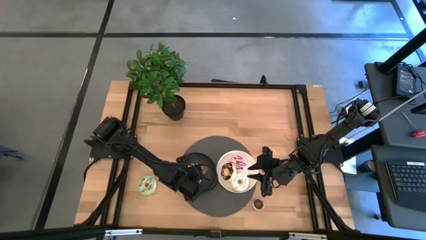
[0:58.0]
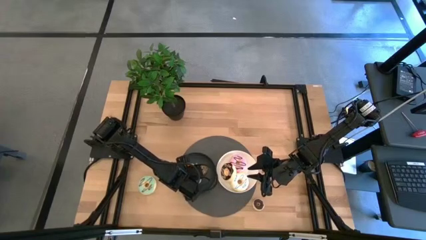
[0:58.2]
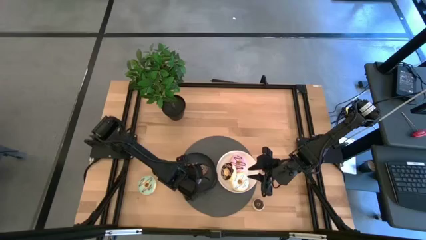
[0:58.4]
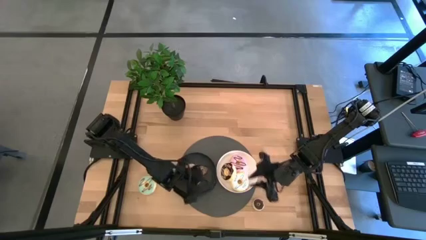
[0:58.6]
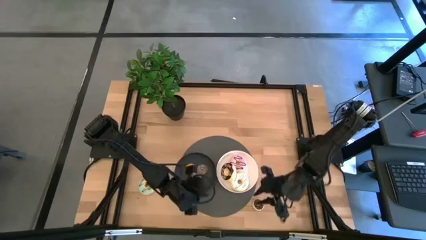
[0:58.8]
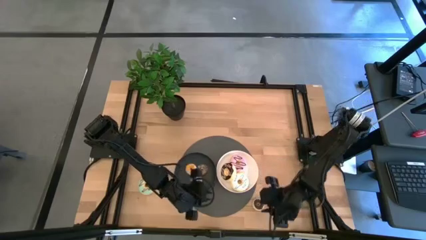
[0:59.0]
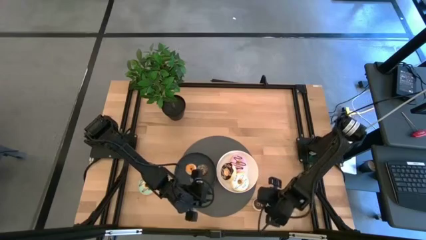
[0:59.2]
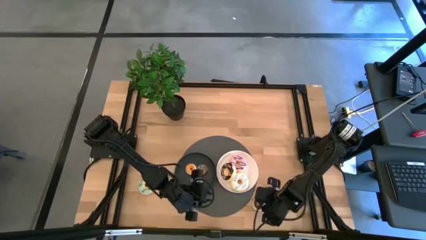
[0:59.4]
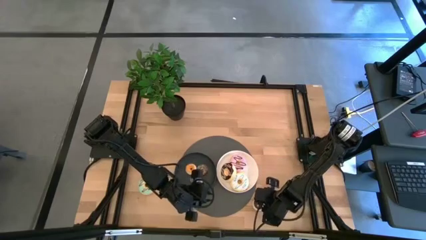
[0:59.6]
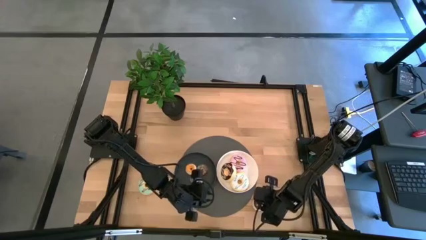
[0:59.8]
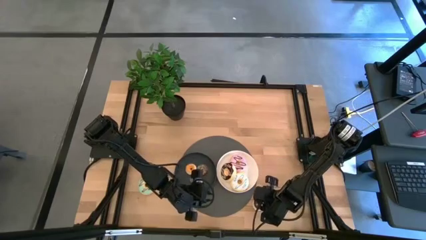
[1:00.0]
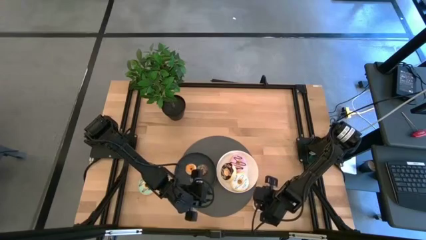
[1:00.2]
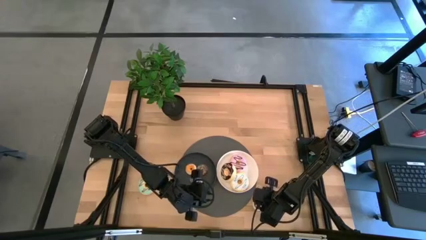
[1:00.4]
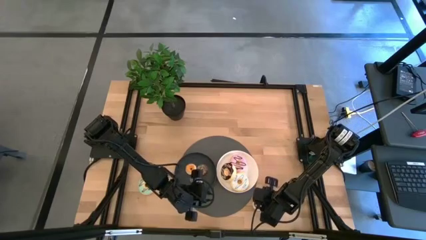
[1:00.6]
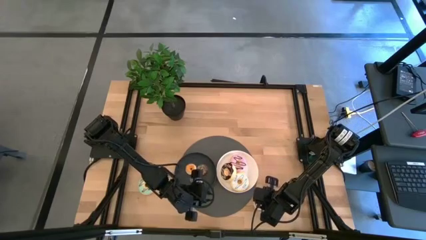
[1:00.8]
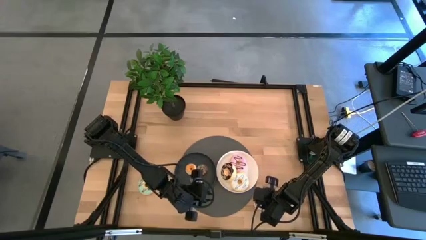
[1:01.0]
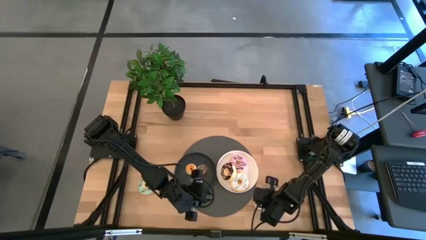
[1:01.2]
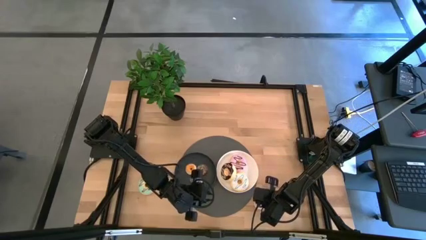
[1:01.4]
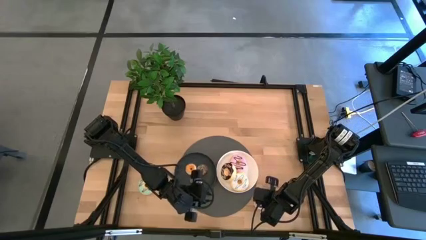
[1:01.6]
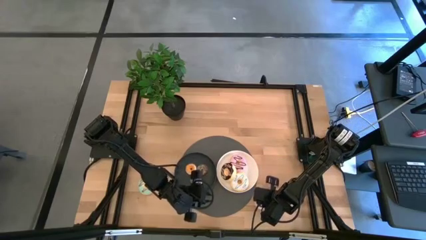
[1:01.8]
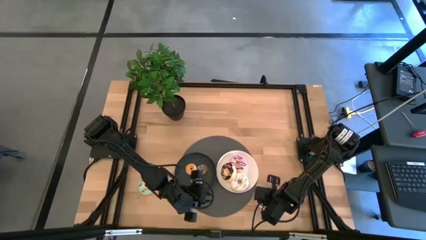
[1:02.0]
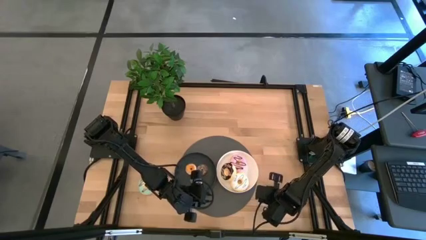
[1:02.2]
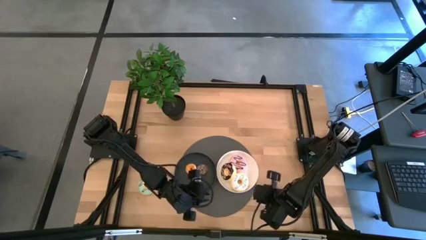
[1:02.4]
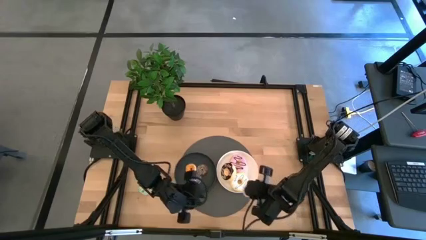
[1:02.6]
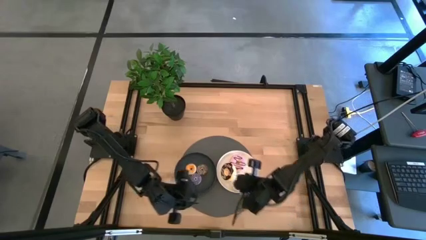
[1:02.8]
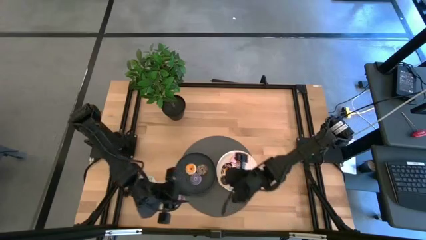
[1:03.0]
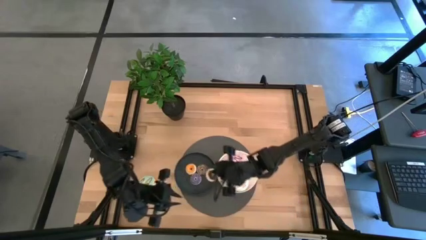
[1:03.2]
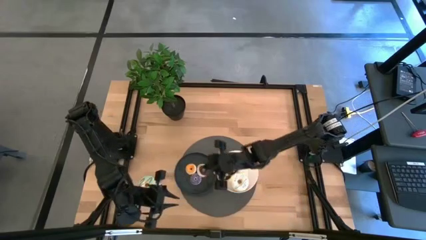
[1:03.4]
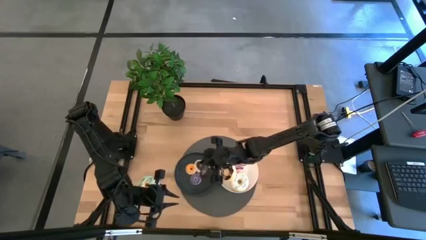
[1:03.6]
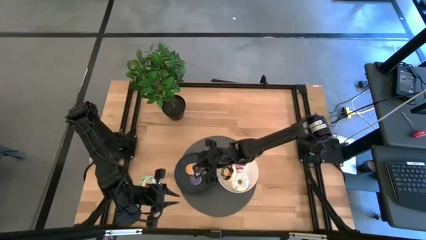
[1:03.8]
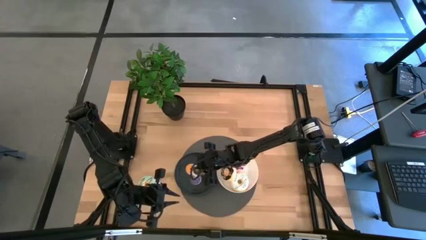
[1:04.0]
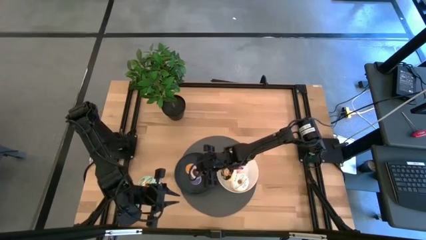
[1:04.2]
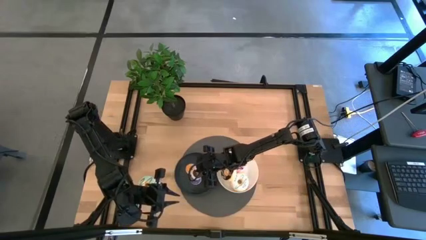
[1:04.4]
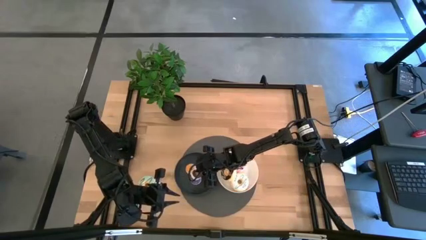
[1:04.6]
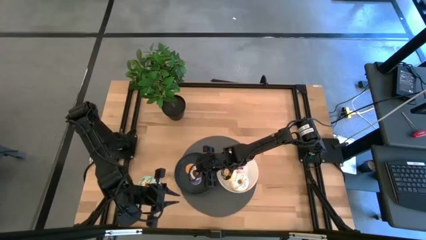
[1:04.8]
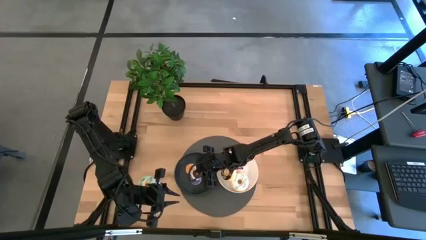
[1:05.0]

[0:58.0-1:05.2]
Task: Pick & Place donuts
Put the small black donut onto the black plate

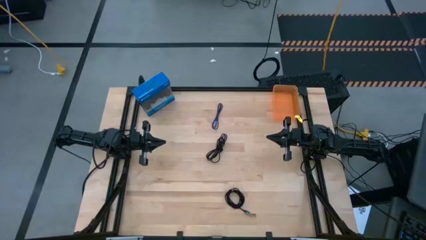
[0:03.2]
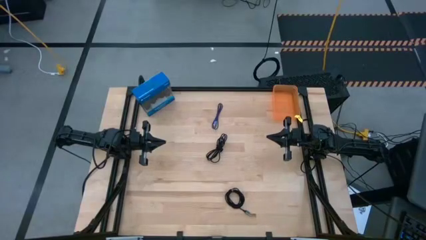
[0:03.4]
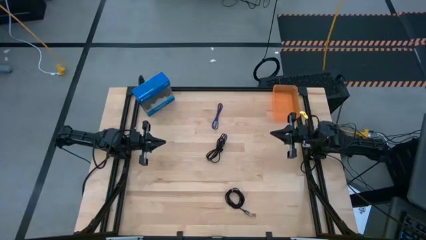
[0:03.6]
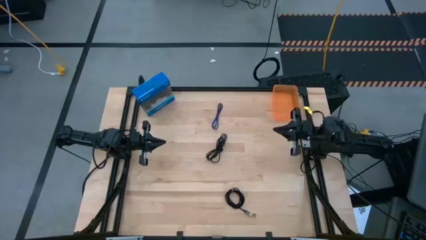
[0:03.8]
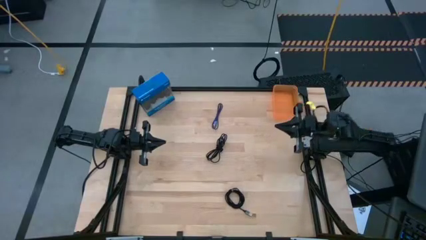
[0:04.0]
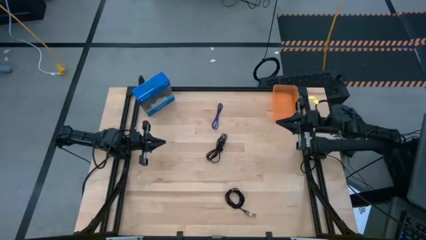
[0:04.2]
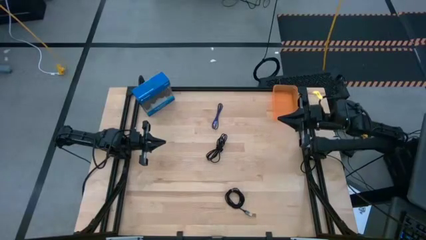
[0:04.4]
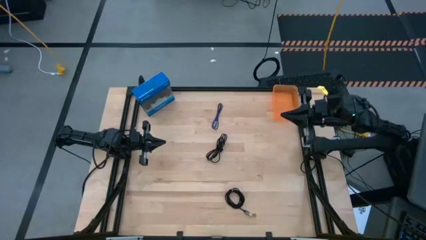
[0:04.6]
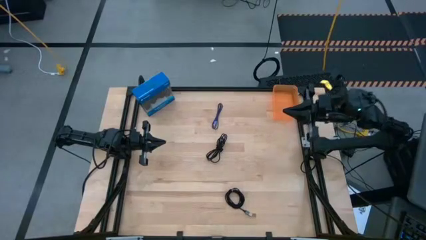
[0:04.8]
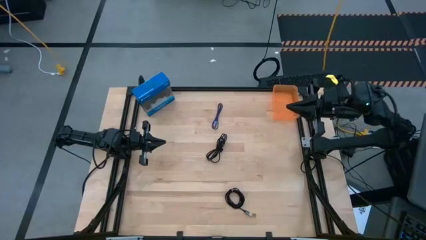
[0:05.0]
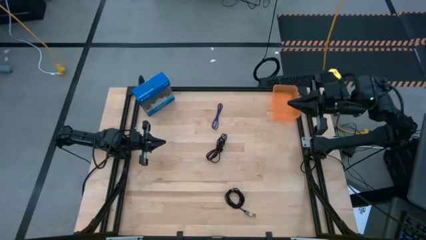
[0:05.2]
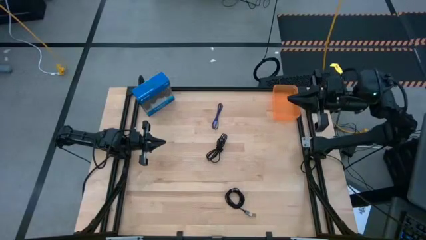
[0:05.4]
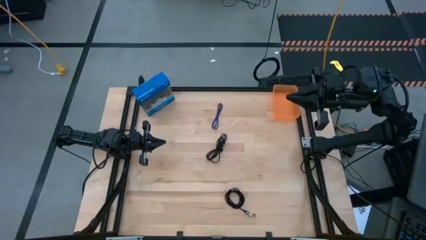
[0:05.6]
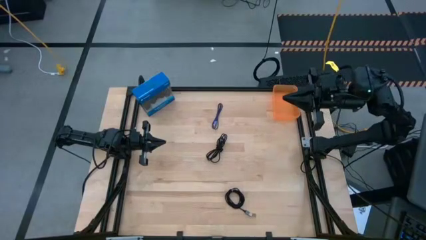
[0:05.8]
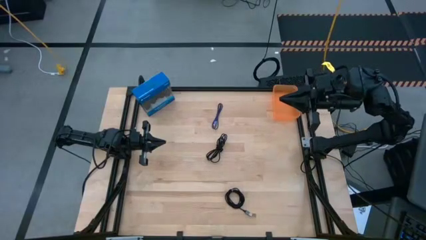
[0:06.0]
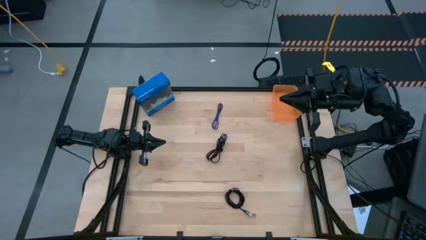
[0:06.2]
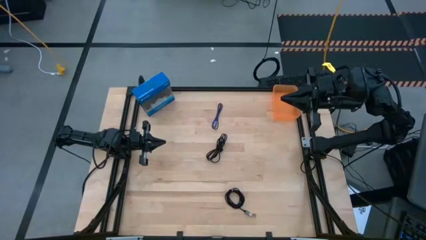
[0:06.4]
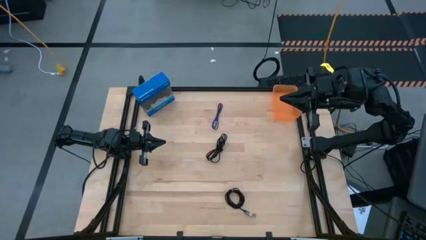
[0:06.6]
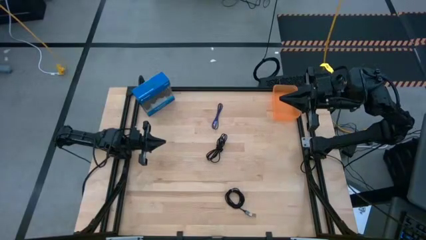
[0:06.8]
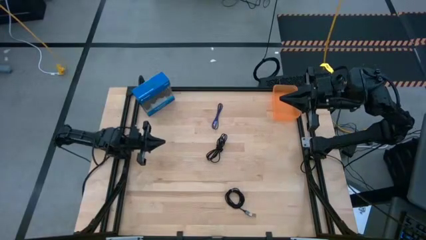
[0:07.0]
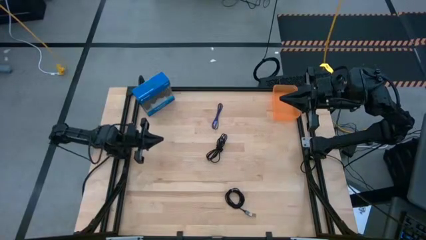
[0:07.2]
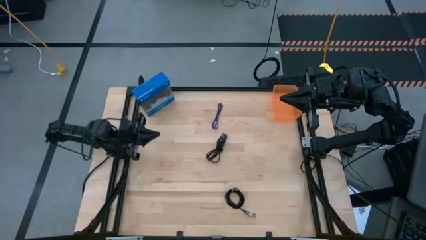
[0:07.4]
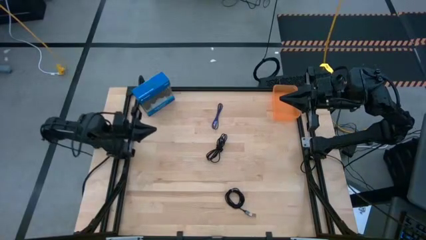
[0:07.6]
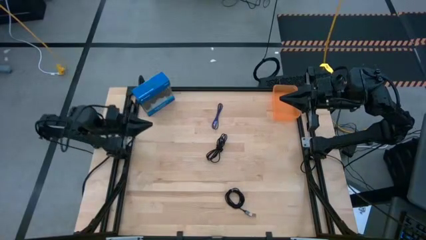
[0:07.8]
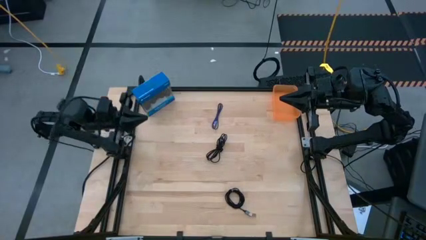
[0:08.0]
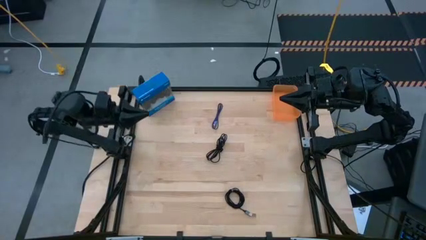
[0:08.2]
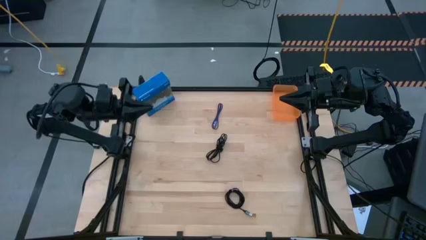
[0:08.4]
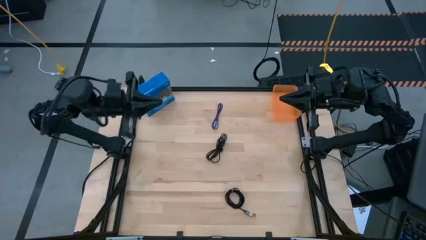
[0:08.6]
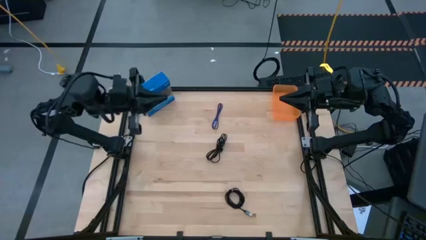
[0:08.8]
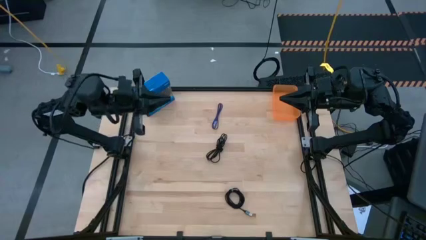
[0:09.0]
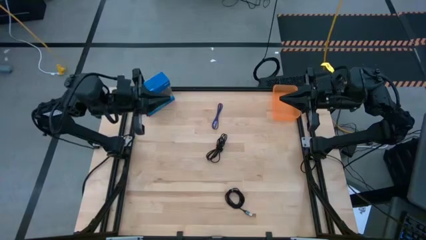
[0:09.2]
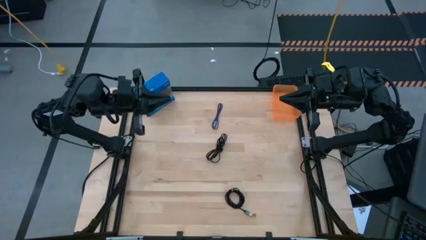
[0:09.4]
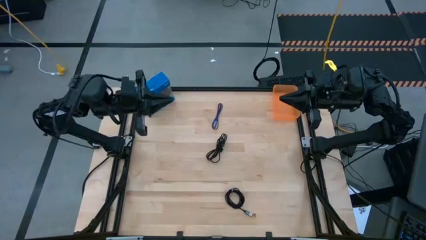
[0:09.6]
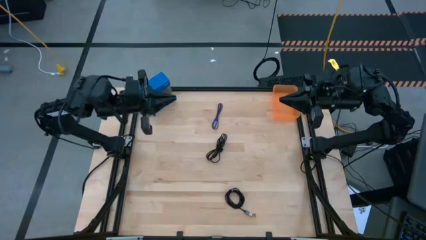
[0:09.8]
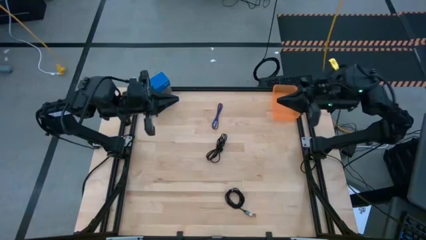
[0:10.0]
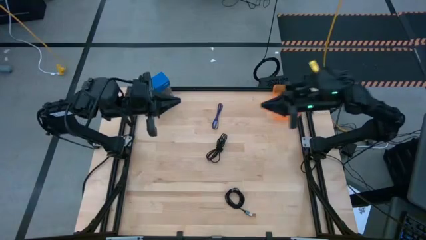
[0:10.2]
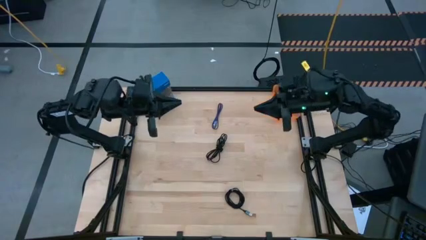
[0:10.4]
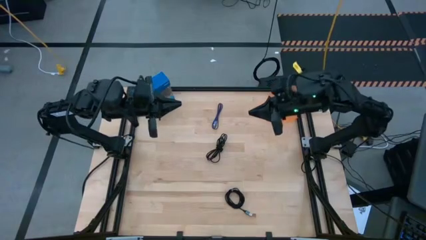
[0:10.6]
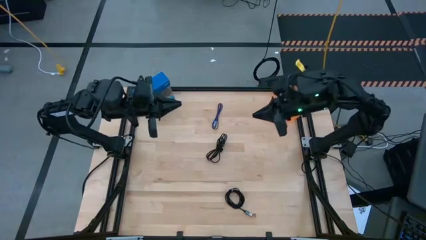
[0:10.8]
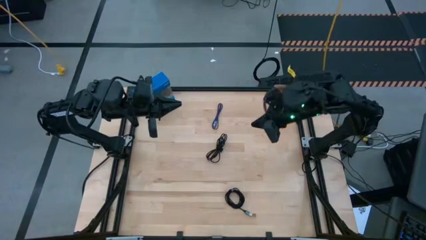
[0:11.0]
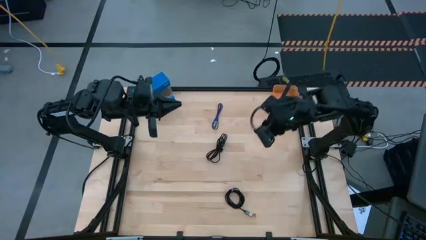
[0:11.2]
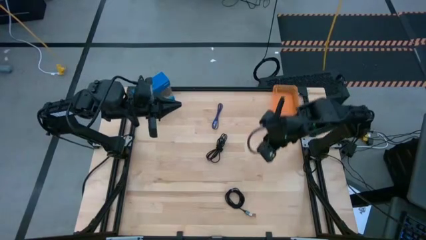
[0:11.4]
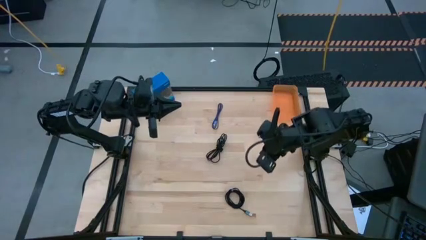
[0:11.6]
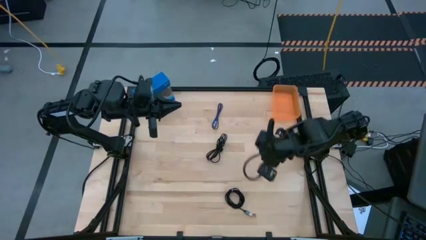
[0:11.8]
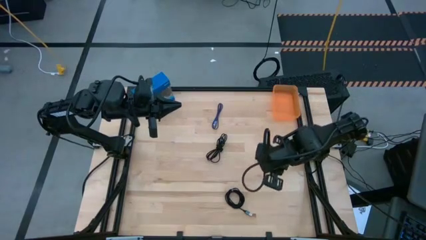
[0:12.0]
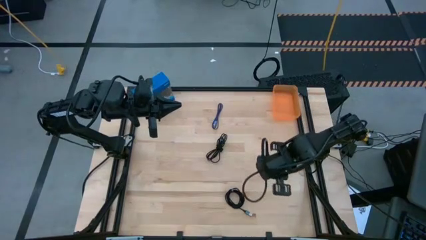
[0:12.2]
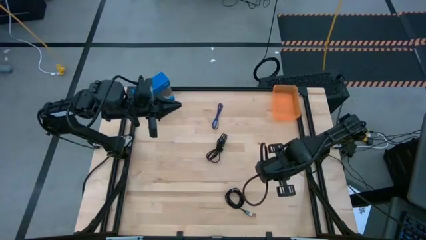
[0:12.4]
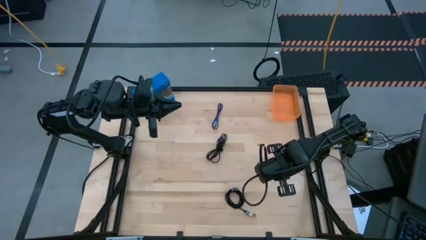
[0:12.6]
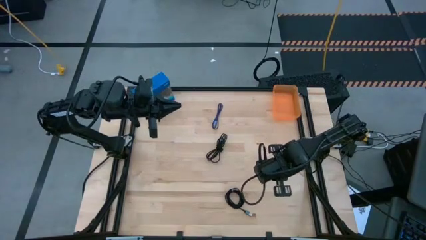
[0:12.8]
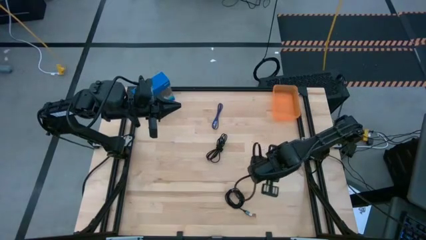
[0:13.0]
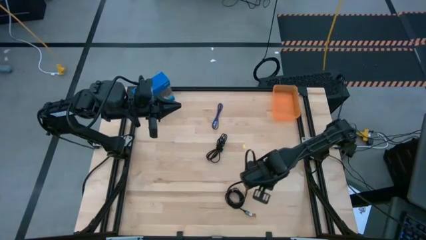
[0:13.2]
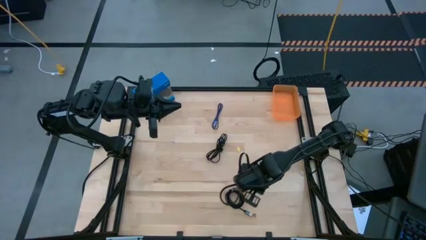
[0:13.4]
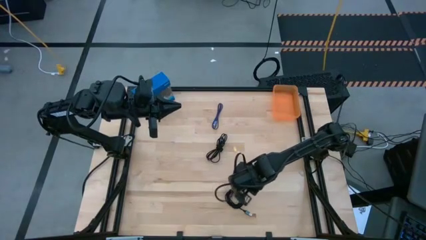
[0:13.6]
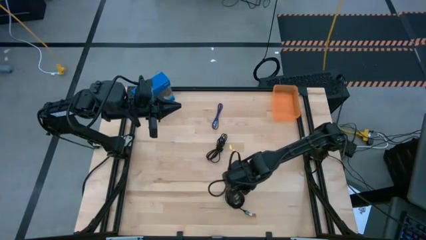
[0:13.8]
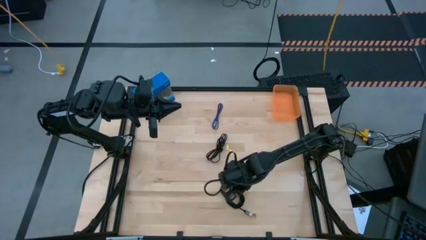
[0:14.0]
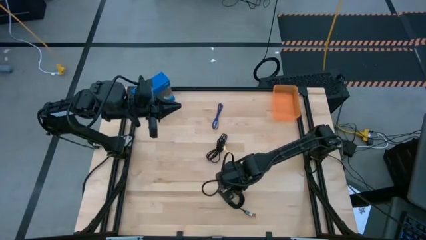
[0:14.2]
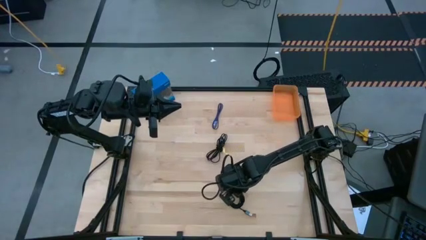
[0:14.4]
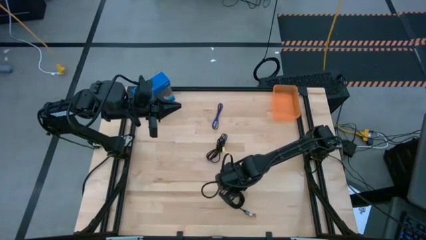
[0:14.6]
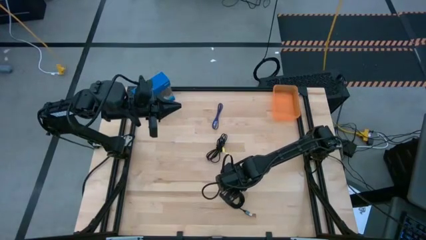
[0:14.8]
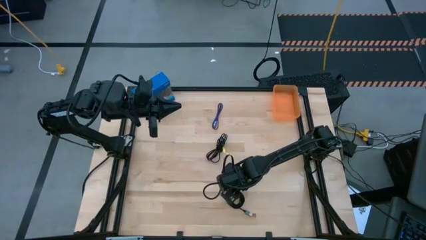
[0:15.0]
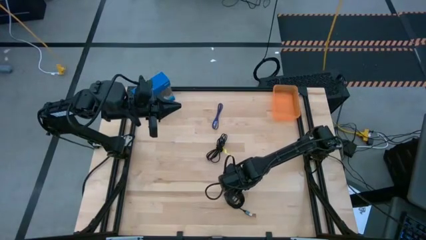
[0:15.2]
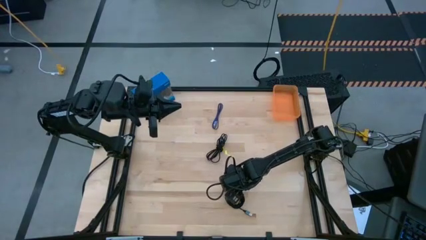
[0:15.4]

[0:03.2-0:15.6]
Task: Pick and place USB-C Cables
Put the bottom black charger cable into the orange bin
